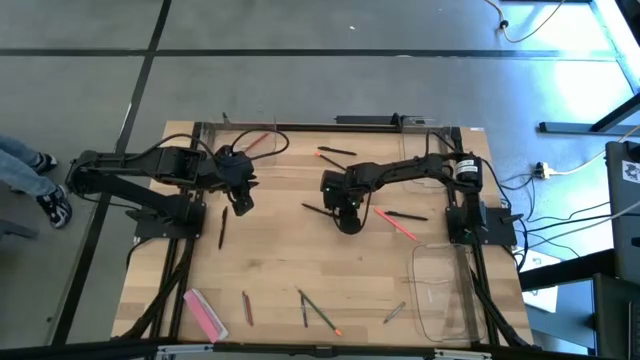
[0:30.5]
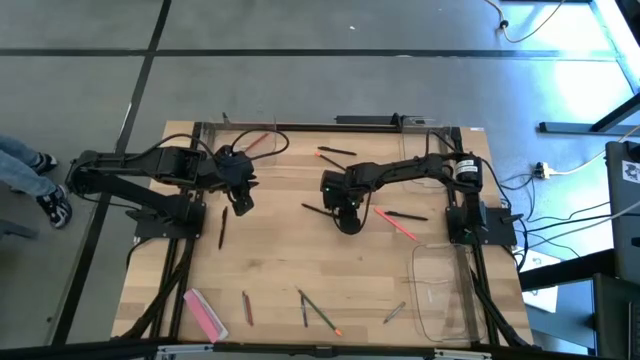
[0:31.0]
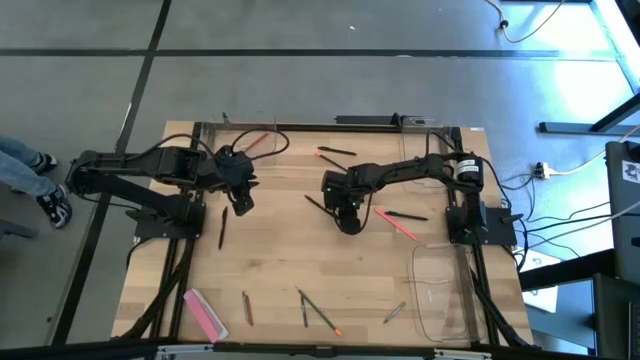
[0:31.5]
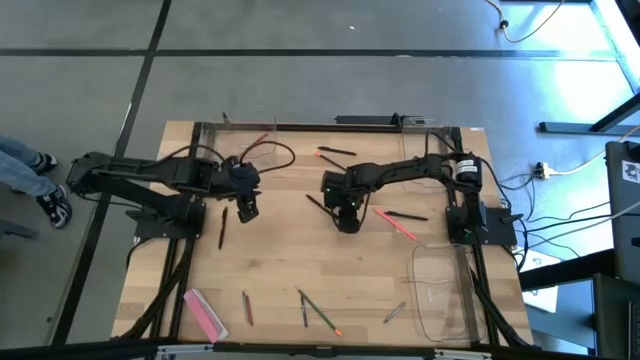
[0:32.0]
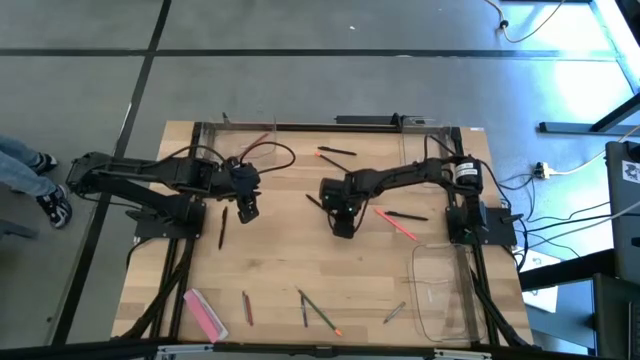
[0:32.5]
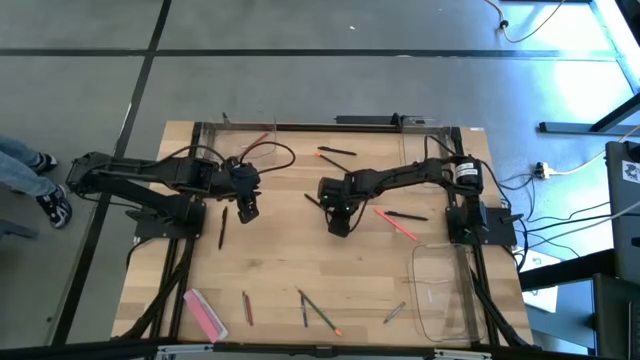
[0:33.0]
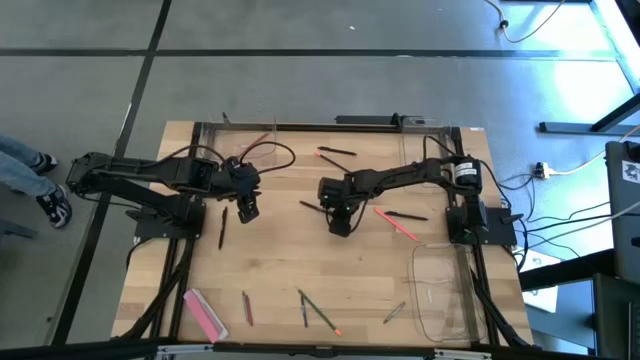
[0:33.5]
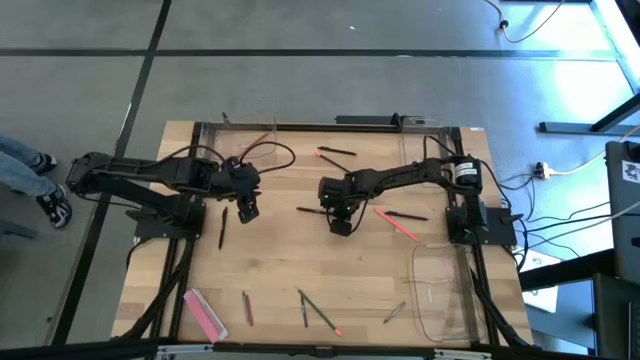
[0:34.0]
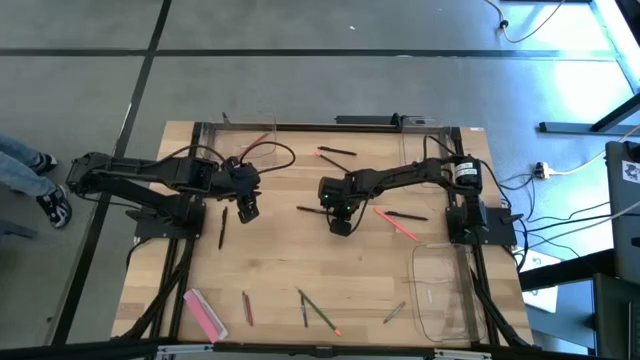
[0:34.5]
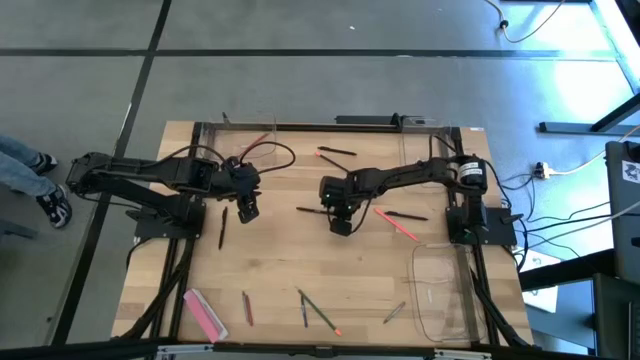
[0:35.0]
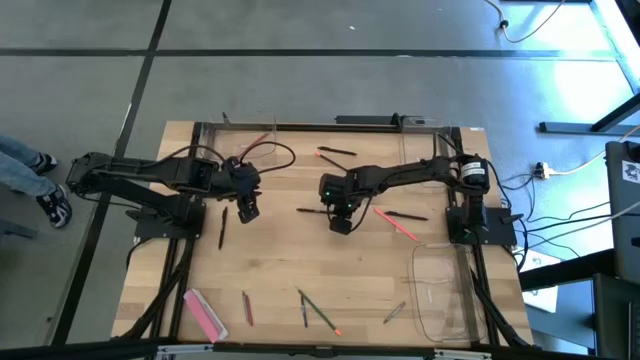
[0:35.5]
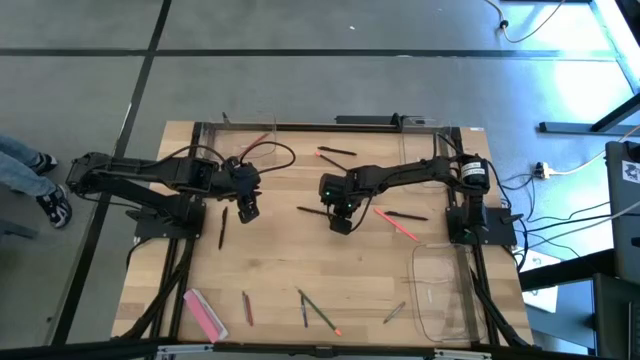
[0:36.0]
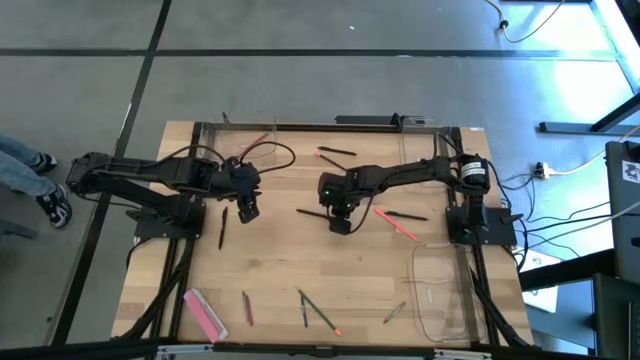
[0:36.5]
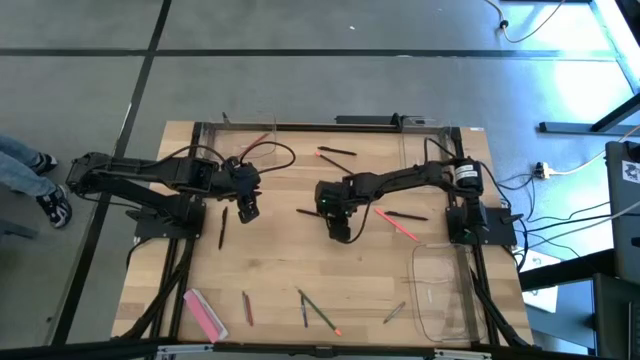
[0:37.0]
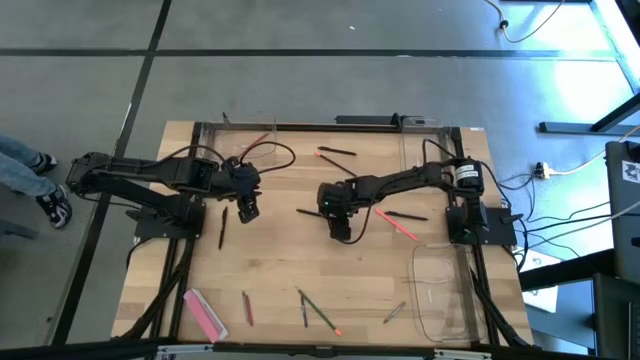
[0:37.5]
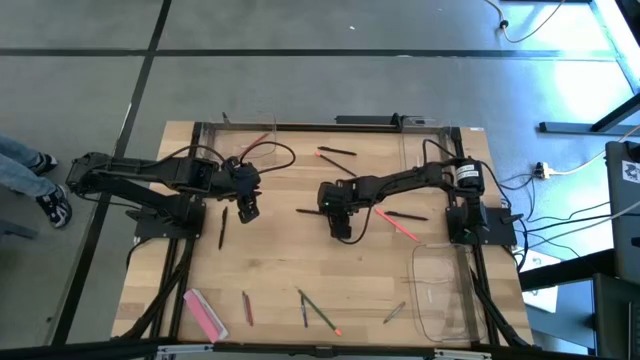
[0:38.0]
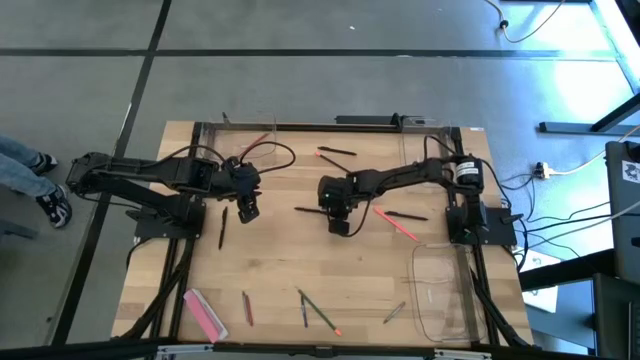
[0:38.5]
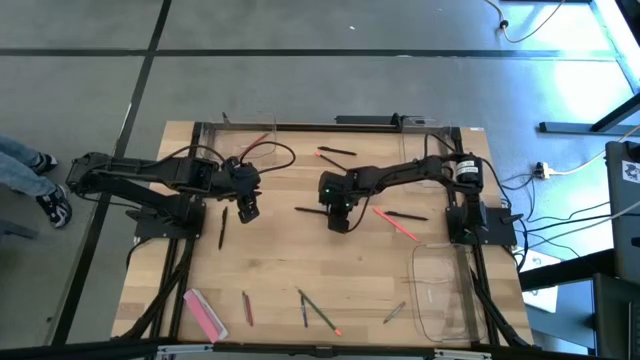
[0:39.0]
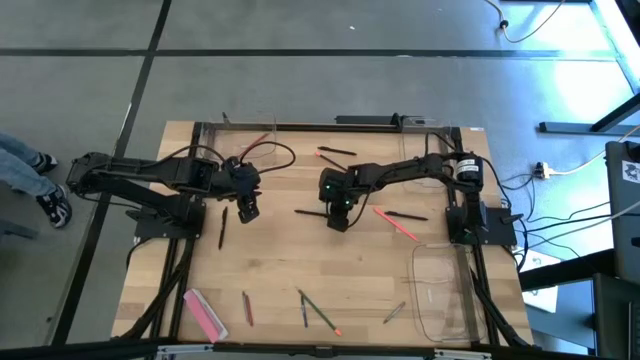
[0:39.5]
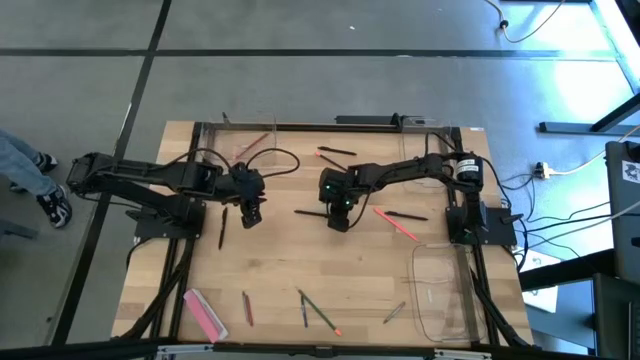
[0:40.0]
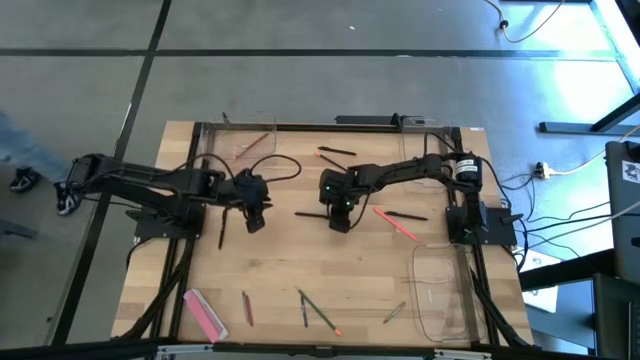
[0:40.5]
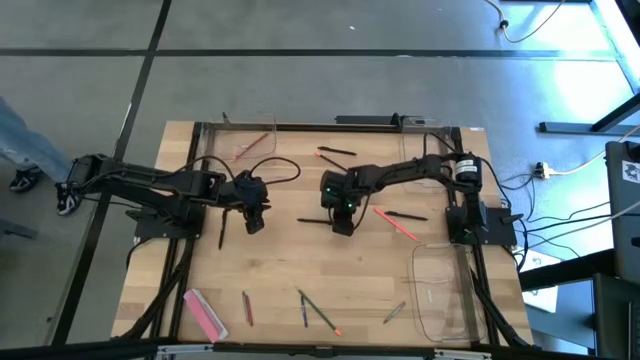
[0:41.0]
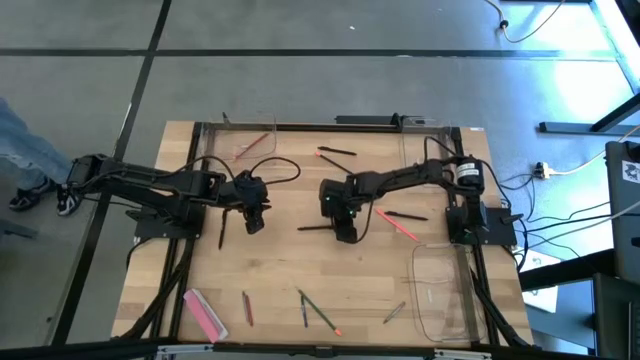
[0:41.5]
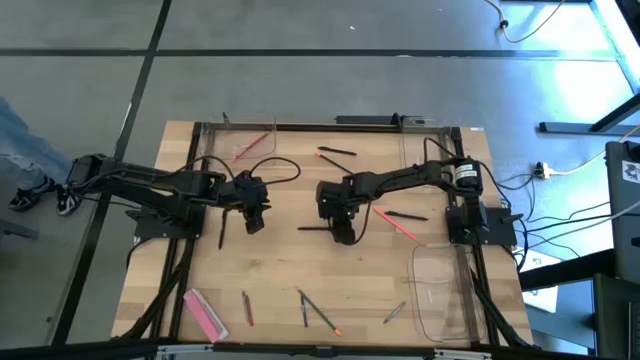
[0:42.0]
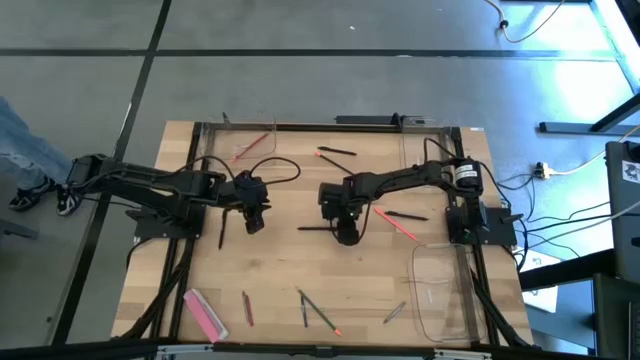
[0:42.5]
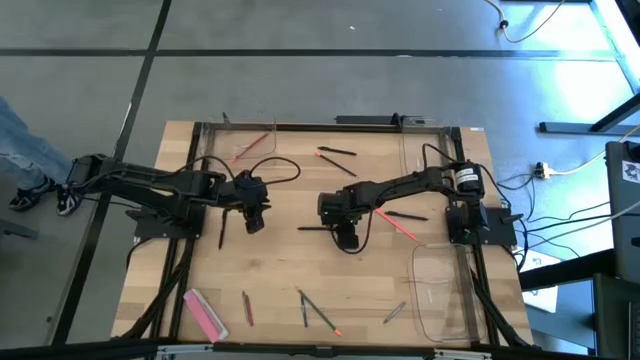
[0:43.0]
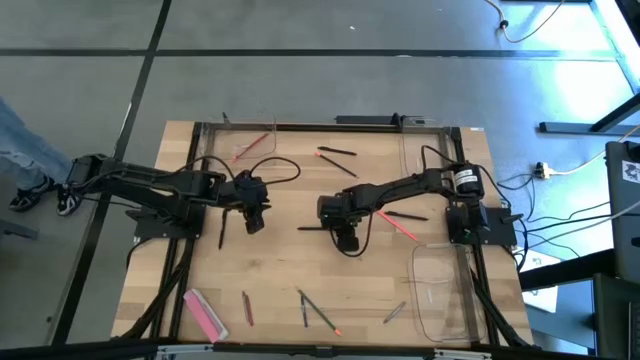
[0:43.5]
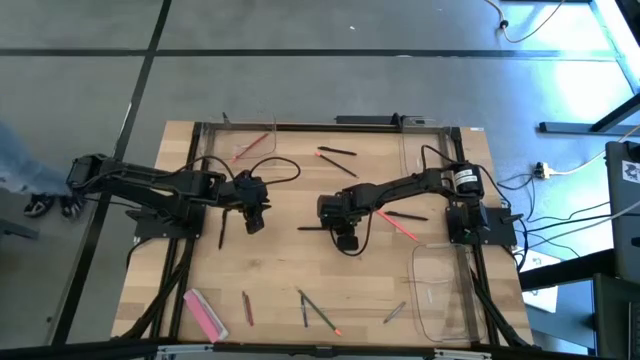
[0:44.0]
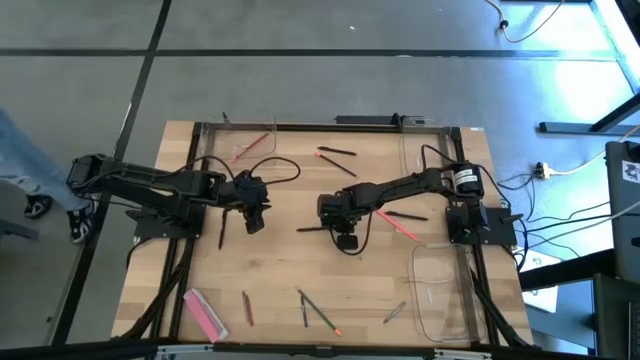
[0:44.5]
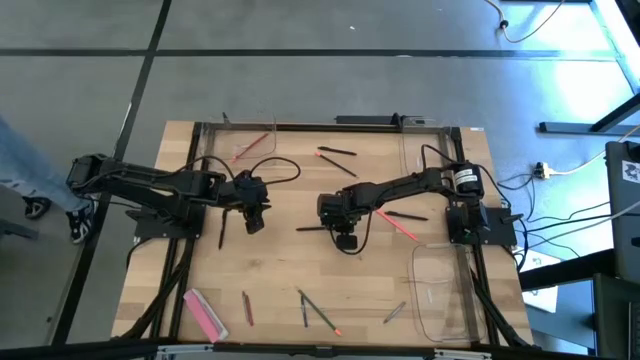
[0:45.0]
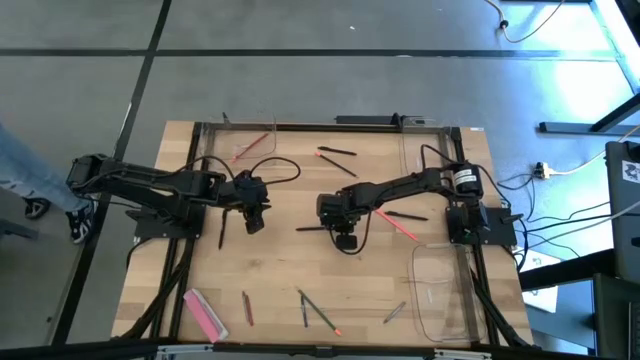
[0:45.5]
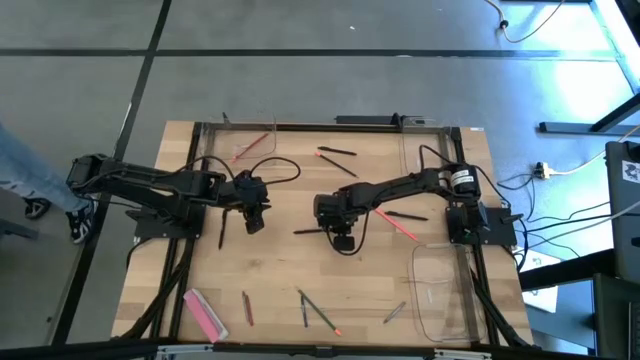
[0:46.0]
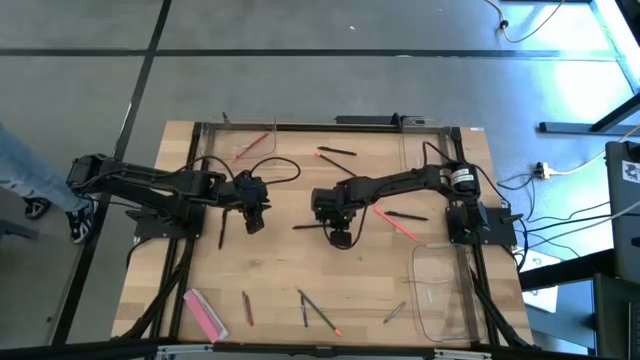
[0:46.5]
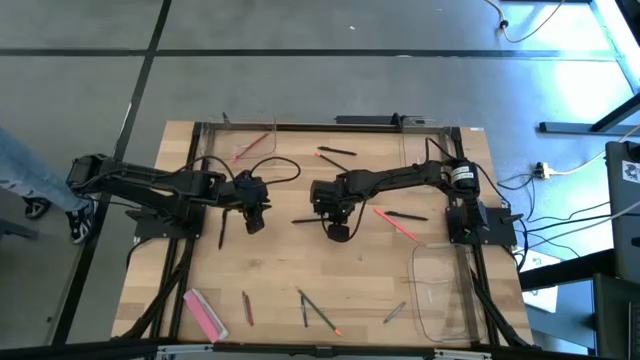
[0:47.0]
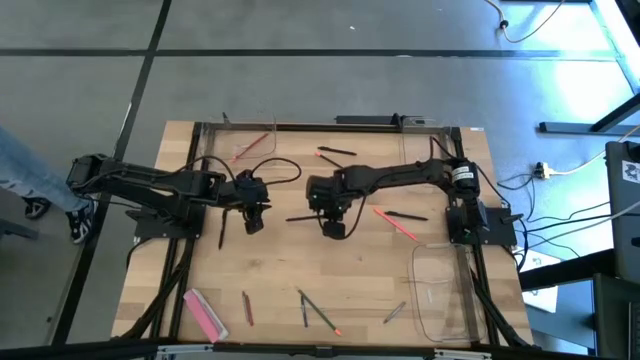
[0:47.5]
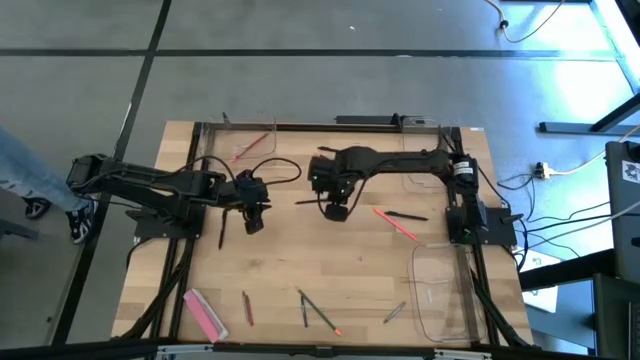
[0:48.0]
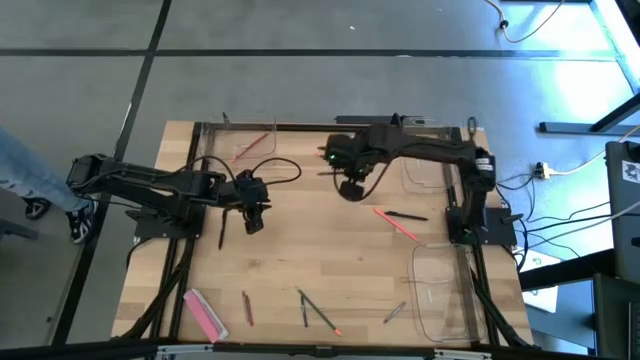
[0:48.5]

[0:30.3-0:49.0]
Task: Sort crayons/erasers/pens/pencils in bins
Put the black pen into the top right transparent bin

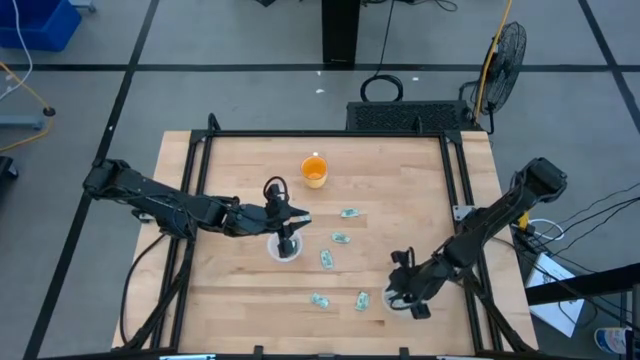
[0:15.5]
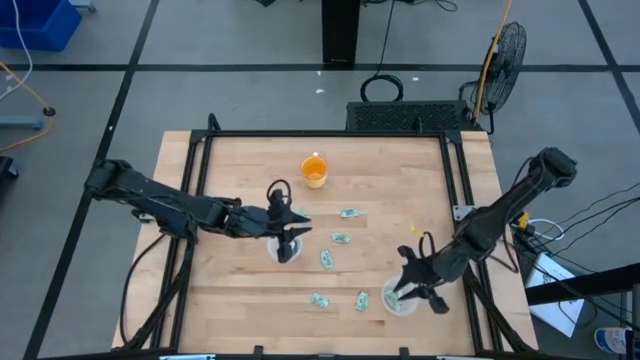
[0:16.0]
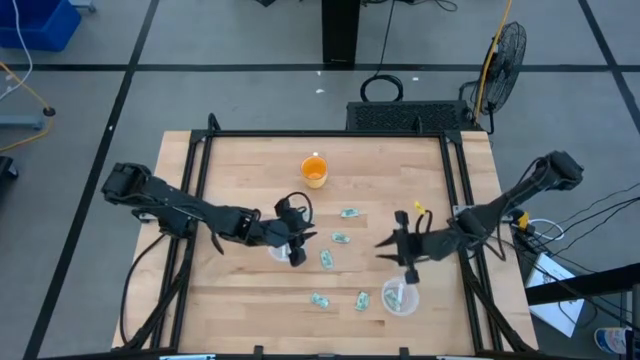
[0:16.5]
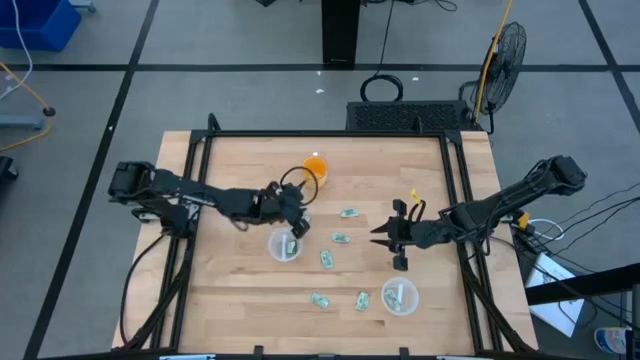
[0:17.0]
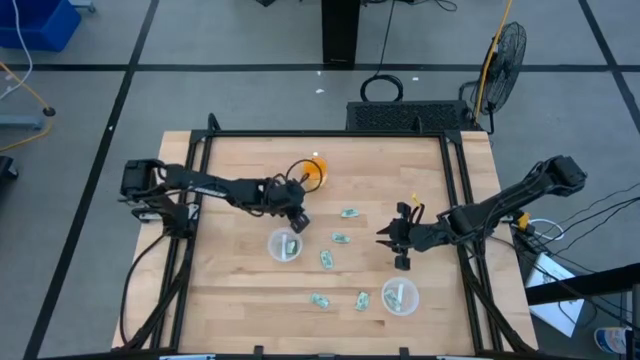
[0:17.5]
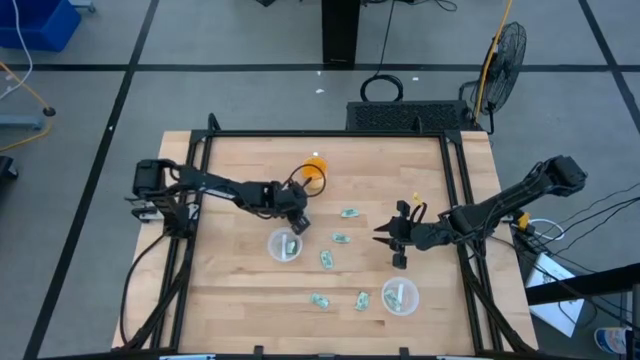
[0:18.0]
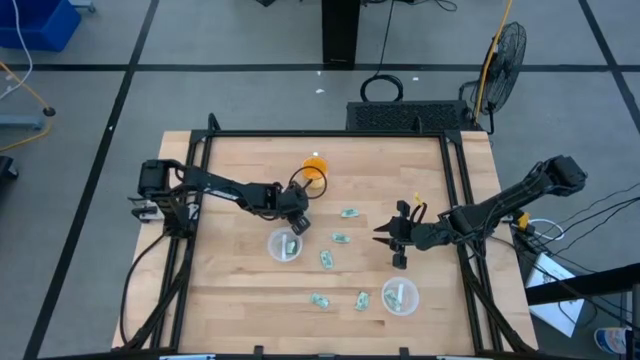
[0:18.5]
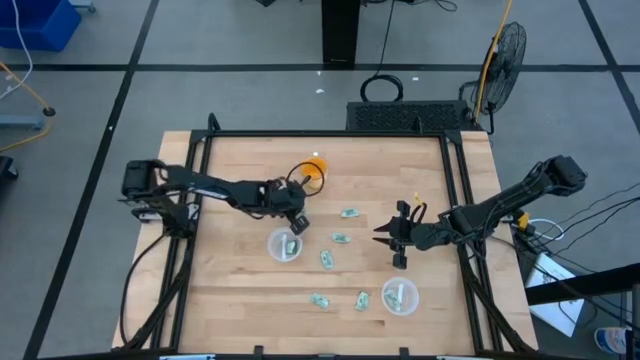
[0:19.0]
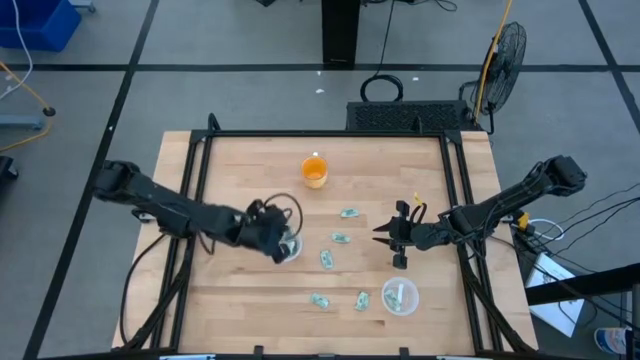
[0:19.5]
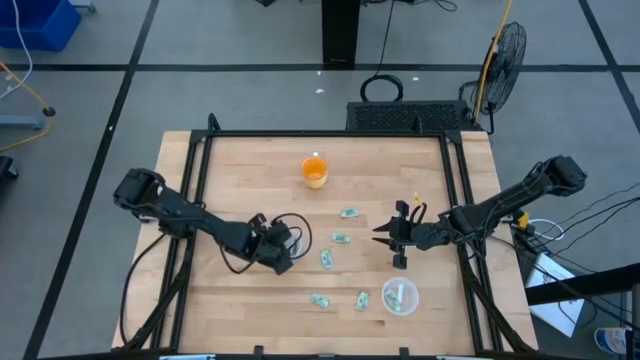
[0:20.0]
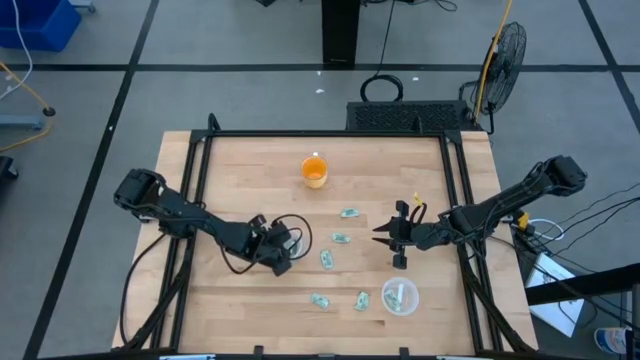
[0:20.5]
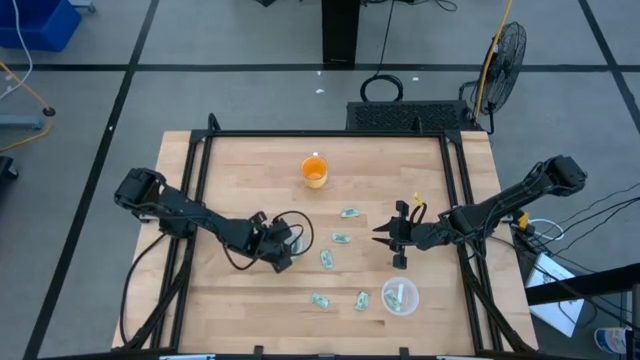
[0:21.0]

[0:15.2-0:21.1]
Task: Pick and place Stevia / Truvia into bins
Put the white stevia packet into the top transparent container
